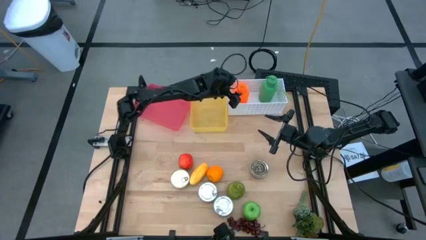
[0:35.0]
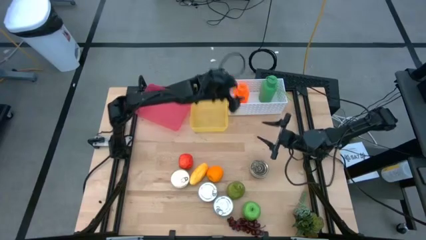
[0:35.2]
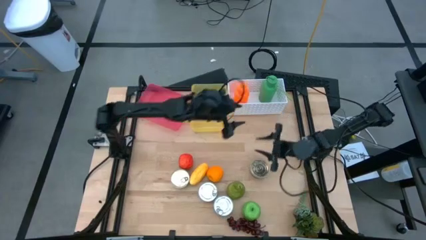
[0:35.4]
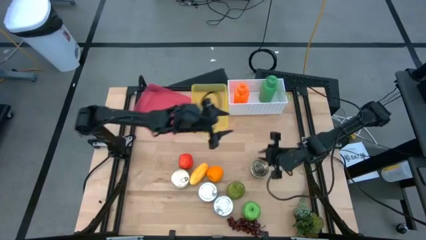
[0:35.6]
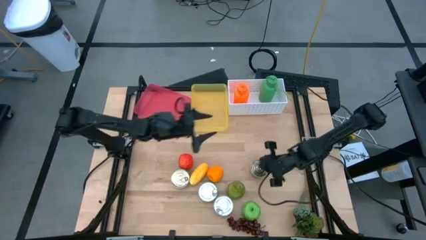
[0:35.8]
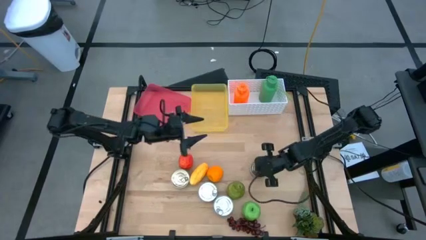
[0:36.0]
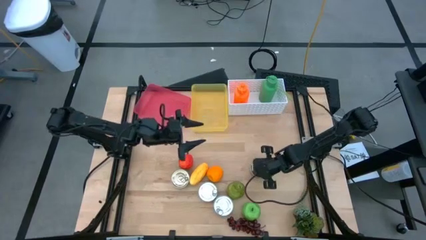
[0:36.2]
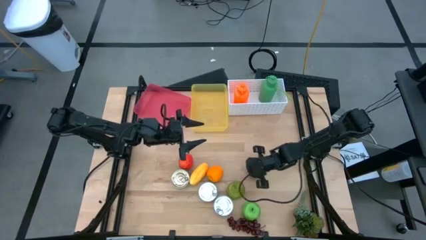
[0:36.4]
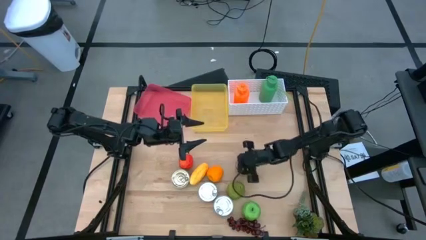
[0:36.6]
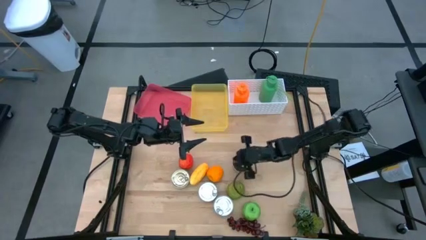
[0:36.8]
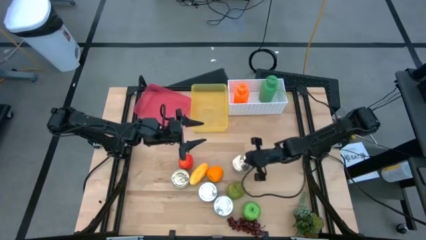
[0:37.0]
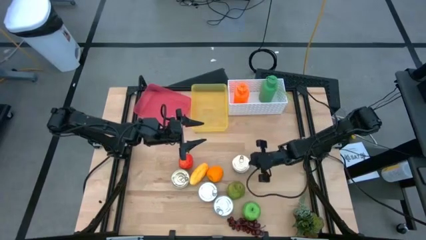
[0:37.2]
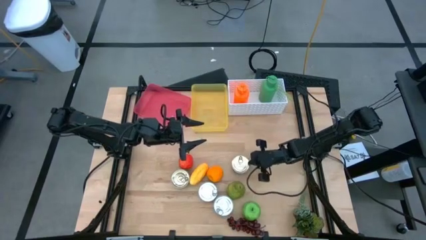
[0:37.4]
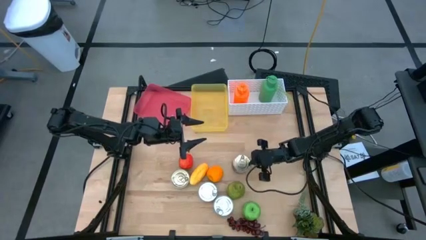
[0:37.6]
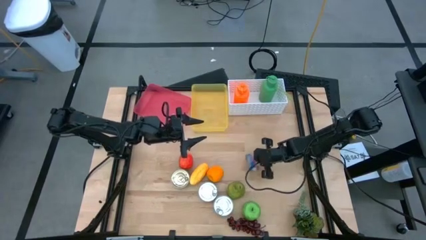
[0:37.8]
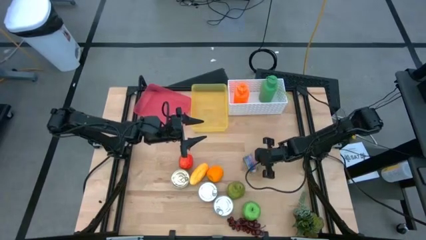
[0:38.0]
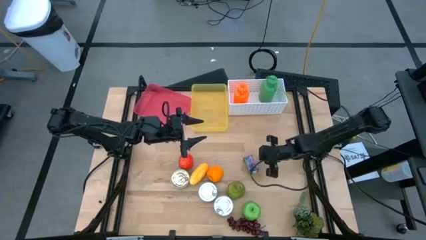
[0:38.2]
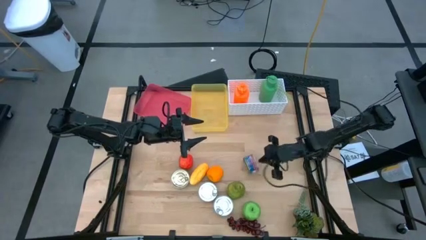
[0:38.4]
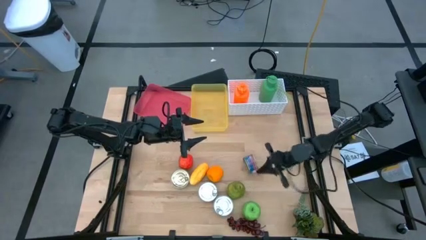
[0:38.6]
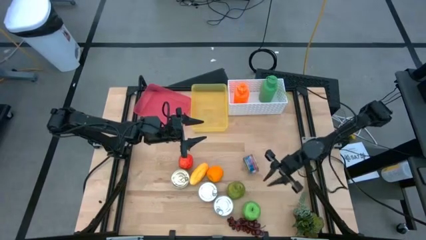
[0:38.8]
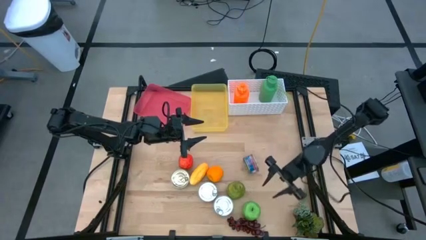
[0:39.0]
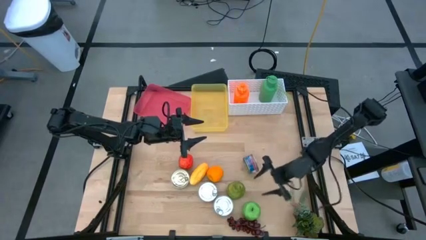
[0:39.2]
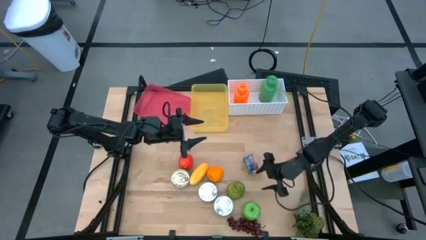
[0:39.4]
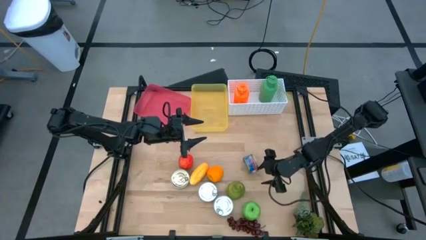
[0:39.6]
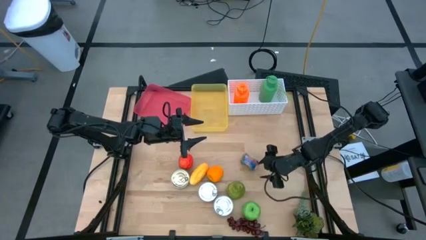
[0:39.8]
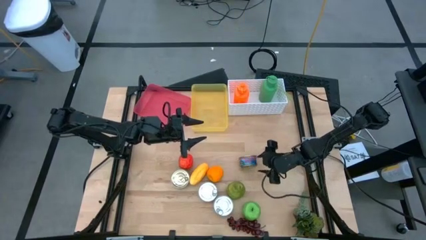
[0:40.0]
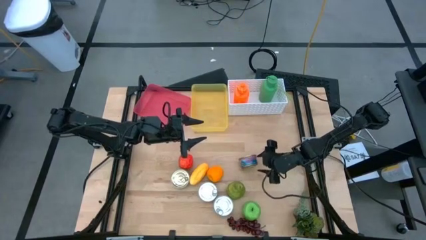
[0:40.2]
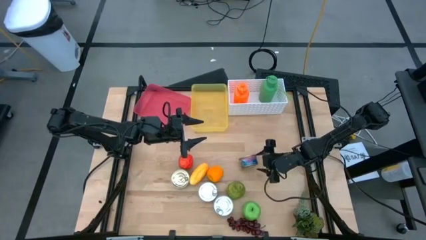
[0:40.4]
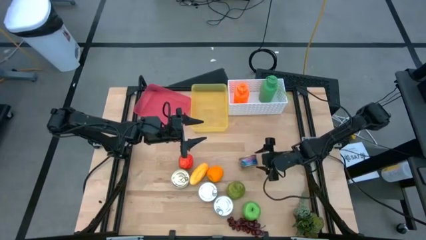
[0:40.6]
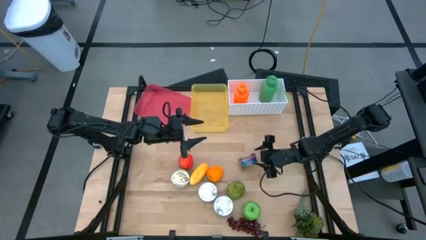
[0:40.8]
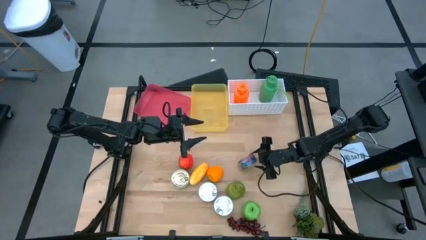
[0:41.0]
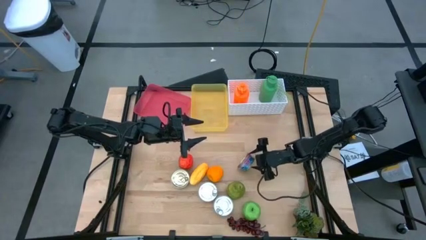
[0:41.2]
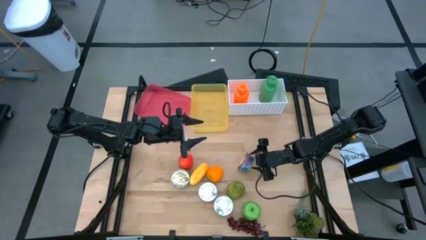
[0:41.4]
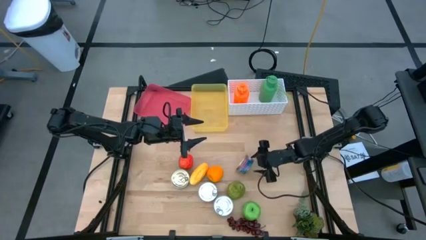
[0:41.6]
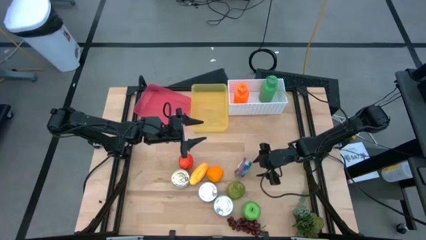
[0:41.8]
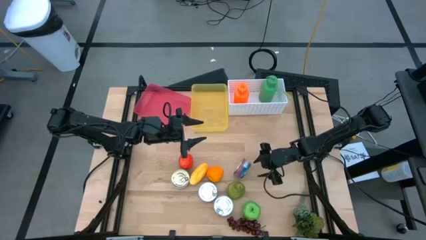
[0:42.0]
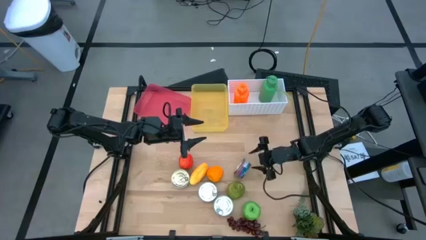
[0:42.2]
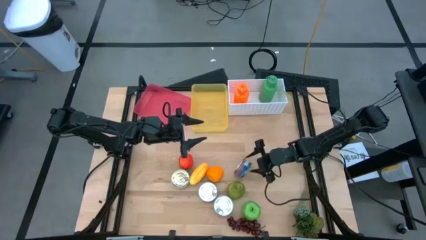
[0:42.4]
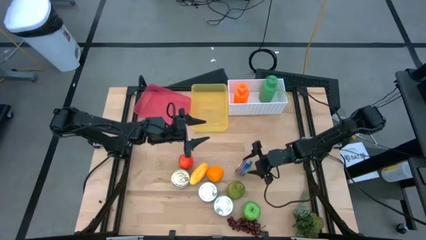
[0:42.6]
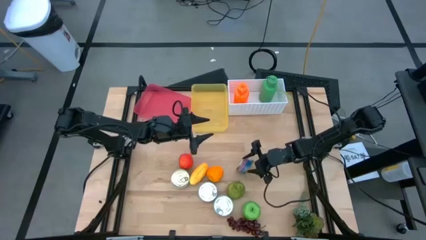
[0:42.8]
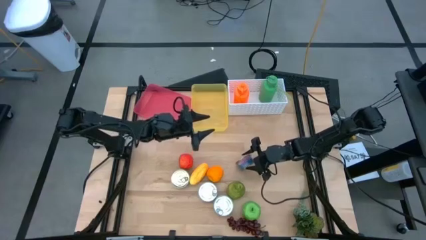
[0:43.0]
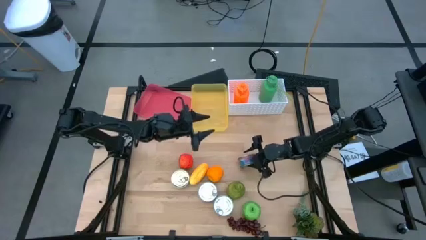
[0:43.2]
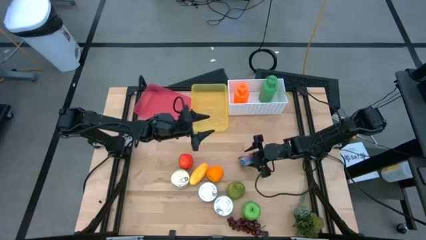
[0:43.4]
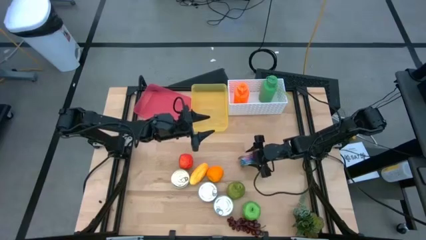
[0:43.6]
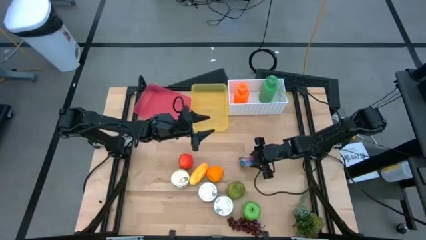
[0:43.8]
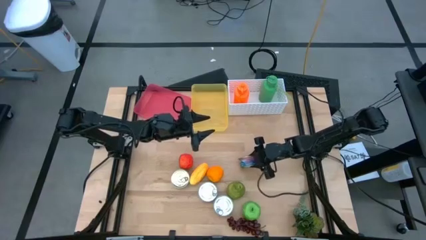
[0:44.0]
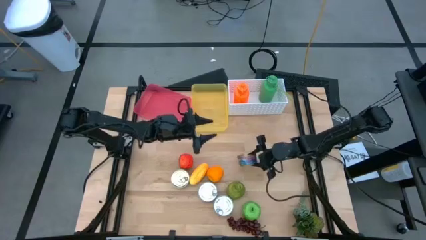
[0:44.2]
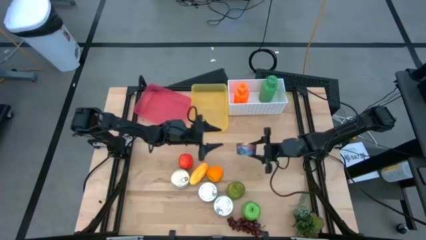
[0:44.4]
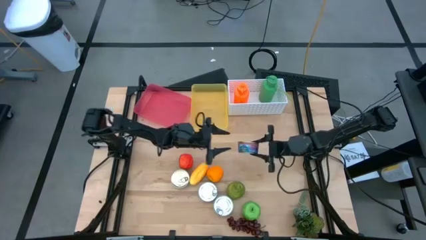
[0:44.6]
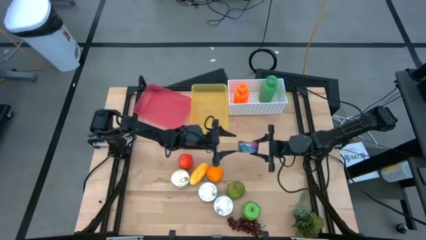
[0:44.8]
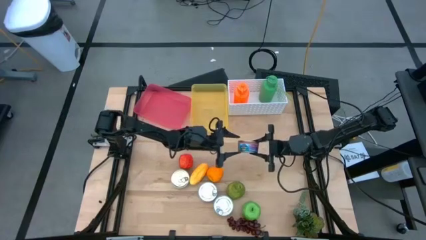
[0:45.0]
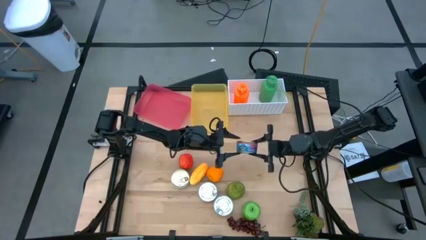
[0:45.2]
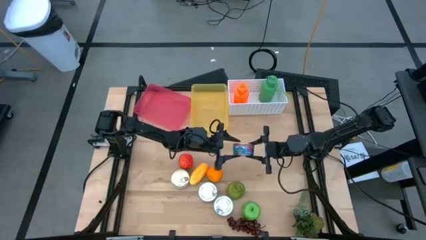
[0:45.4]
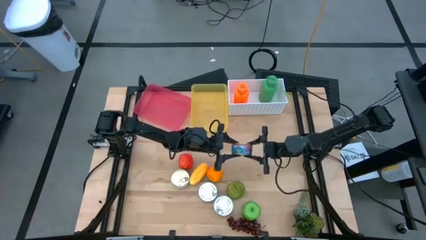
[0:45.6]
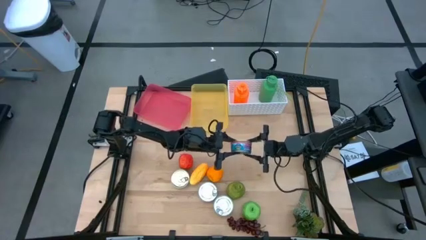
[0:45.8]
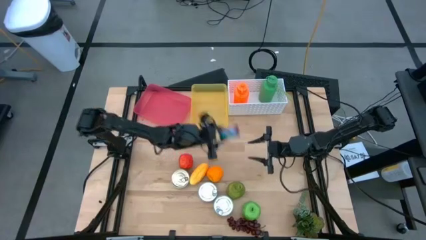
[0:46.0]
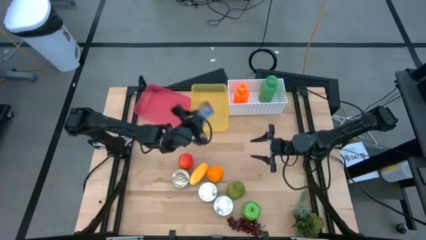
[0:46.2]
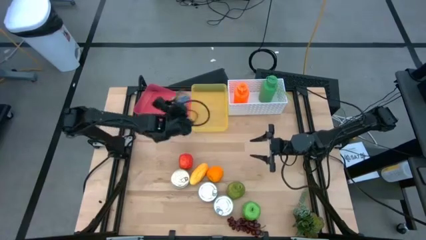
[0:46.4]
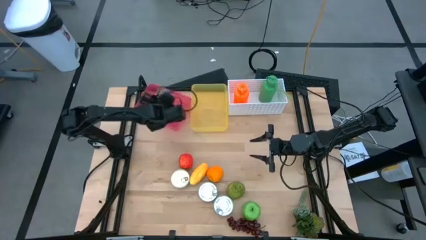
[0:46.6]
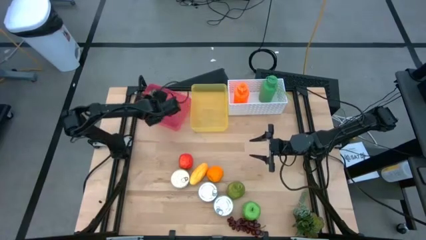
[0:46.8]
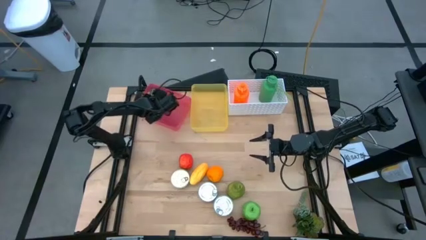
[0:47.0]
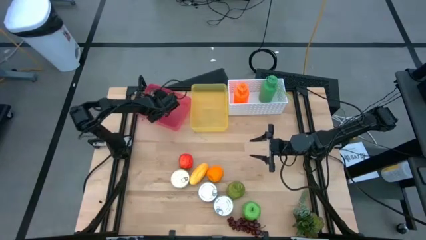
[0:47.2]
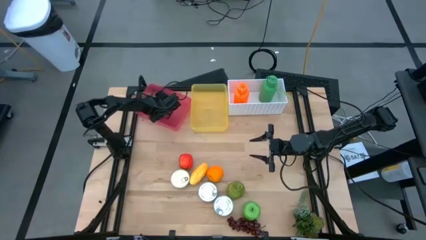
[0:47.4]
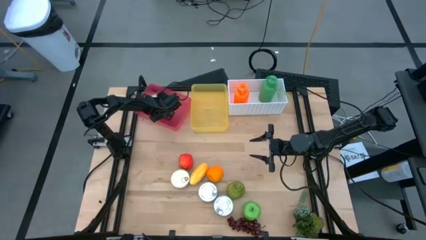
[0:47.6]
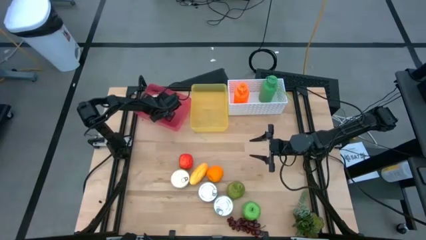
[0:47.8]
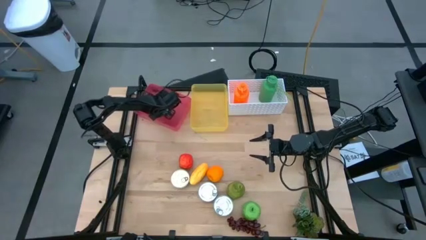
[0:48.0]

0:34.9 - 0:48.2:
Task: Pick & Place Food Item
Put the right blue and pink tuna can into the red bin

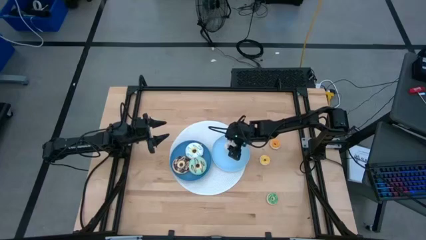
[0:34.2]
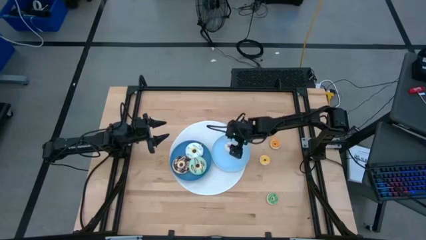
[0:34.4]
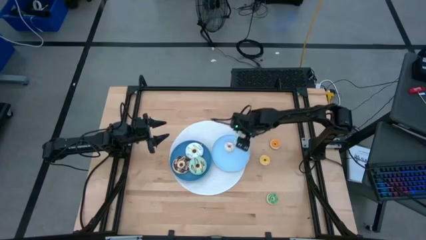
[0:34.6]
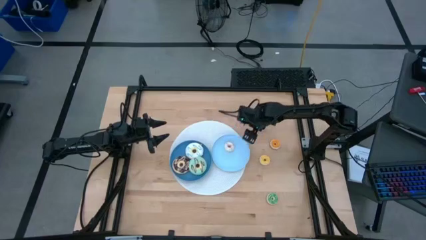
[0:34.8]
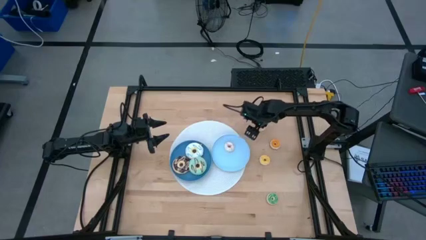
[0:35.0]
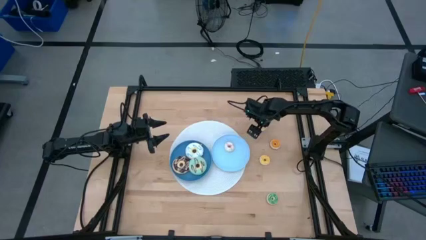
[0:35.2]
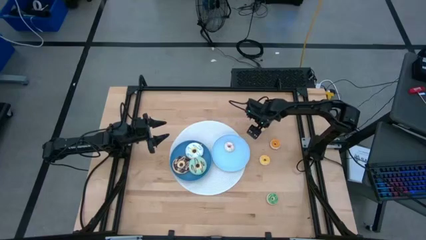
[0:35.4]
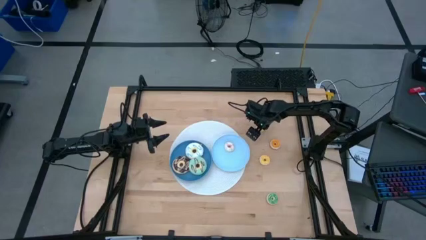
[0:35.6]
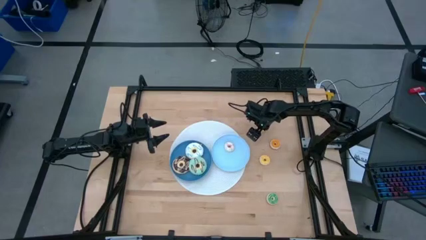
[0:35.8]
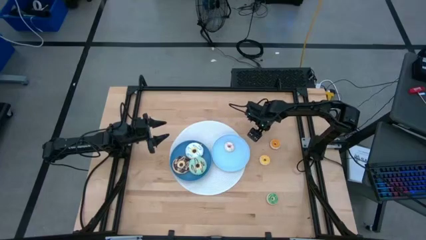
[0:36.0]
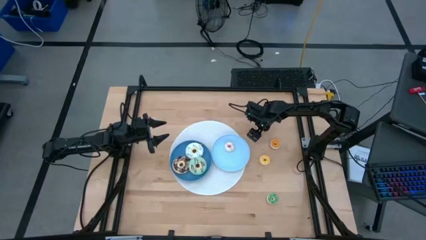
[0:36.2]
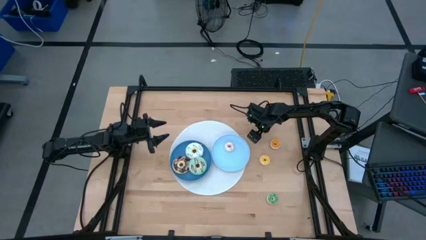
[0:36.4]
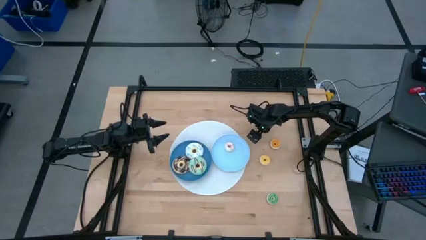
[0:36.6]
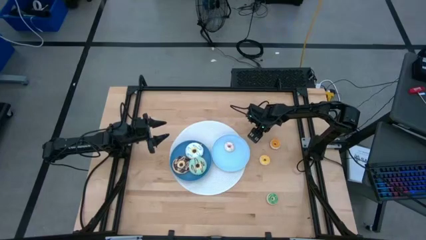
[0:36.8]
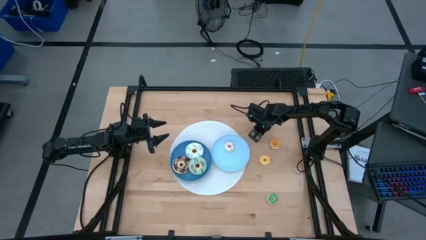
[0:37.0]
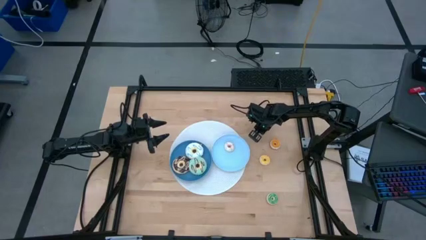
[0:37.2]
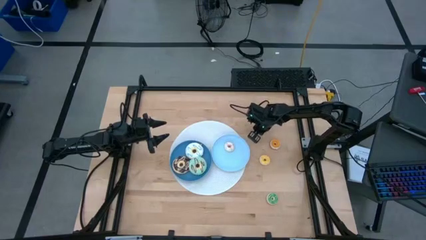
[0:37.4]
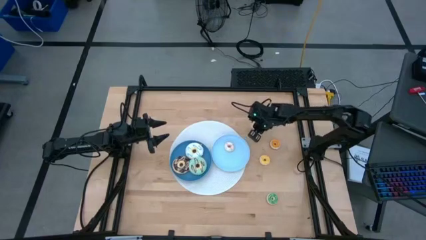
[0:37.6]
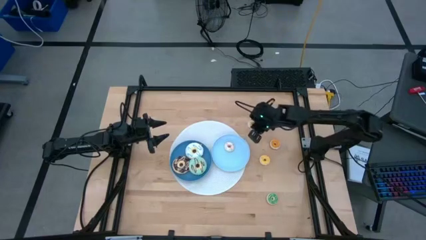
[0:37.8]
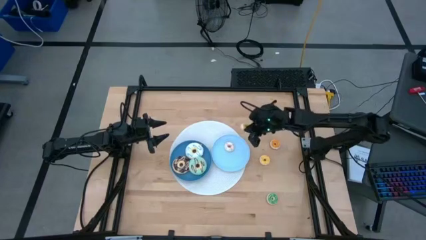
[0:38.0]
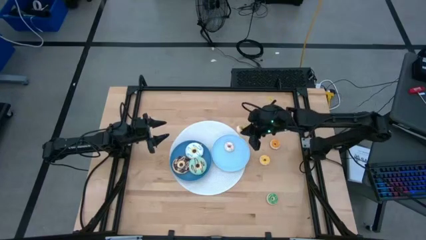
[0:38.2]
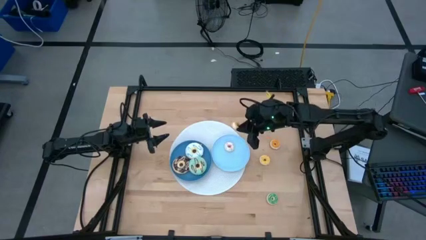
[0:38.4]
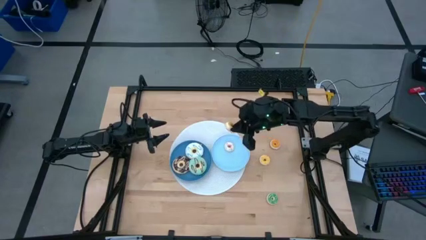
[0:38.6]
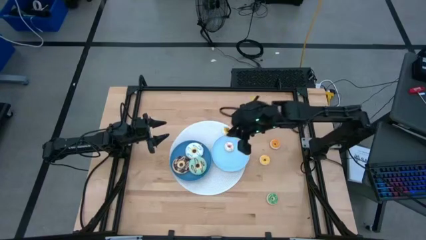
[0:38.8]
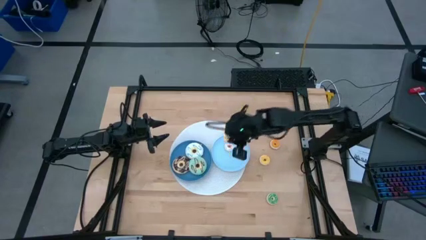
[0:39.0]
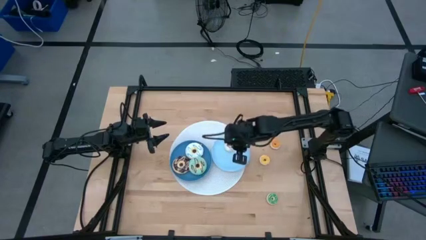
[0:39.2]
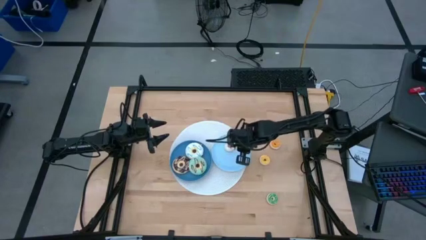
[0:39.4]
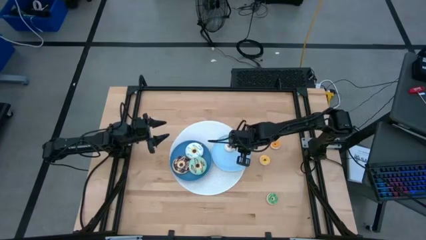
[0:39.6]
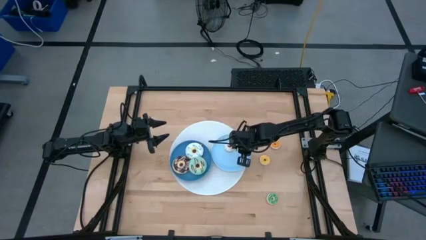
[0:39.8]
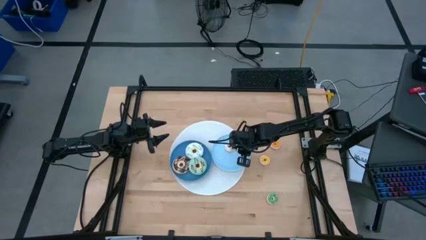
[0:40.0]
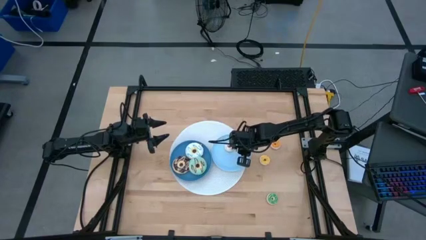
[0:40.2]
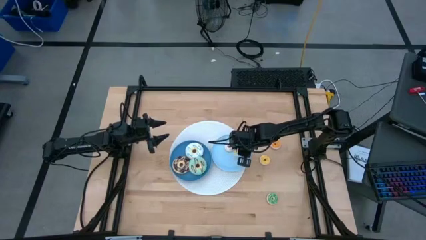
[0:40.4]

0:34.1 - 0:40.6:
Task: Pick & Place donuts
Put the top small yellow donut on the light blue plate
